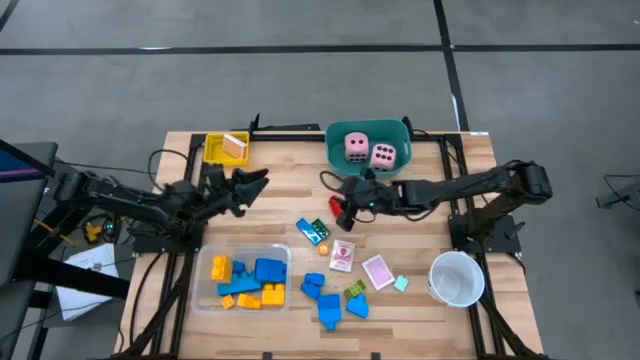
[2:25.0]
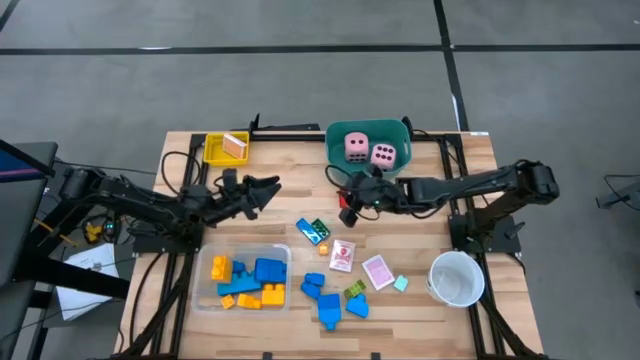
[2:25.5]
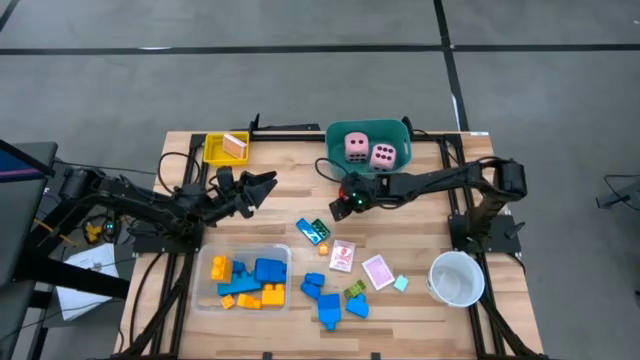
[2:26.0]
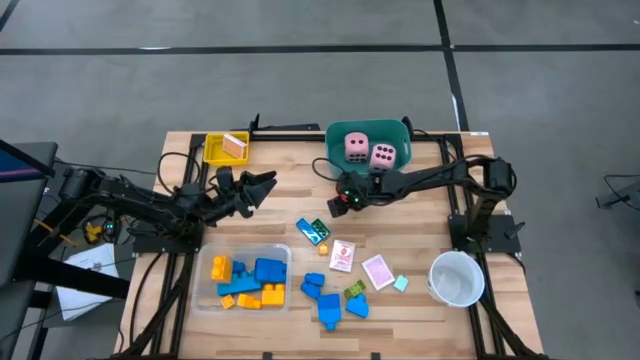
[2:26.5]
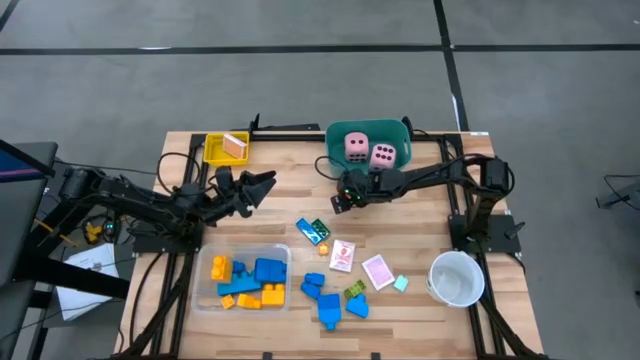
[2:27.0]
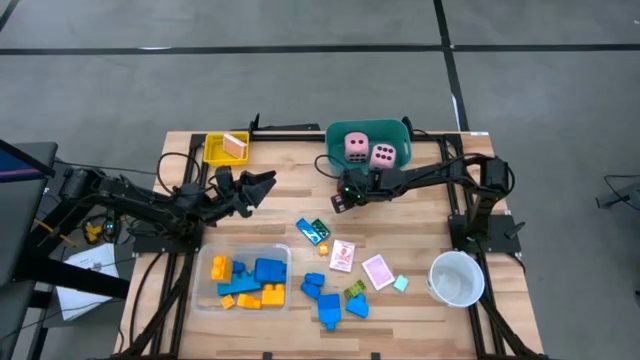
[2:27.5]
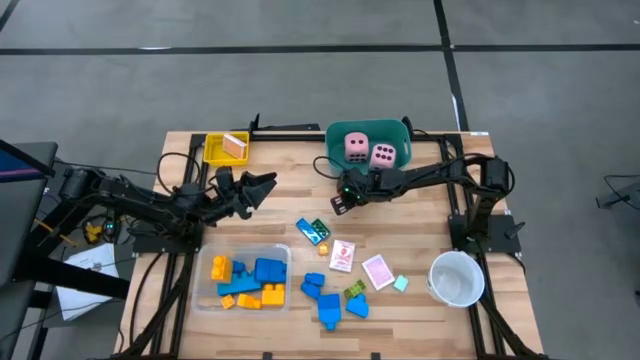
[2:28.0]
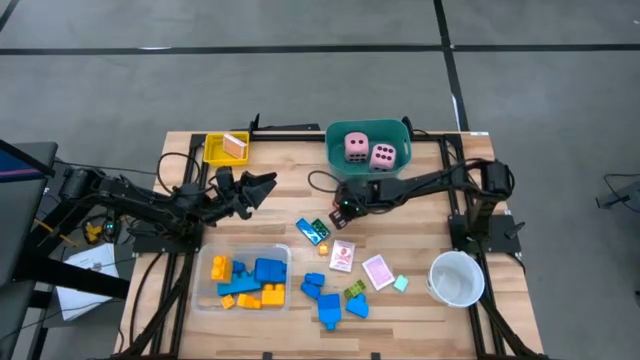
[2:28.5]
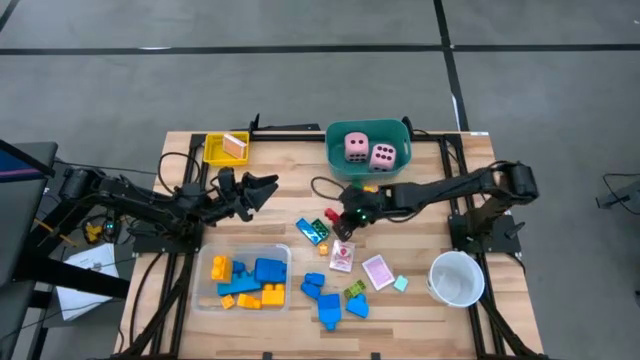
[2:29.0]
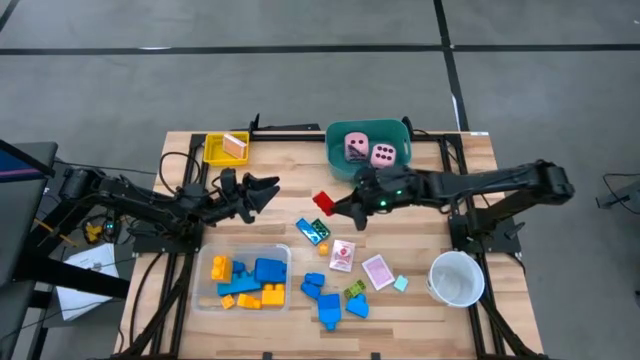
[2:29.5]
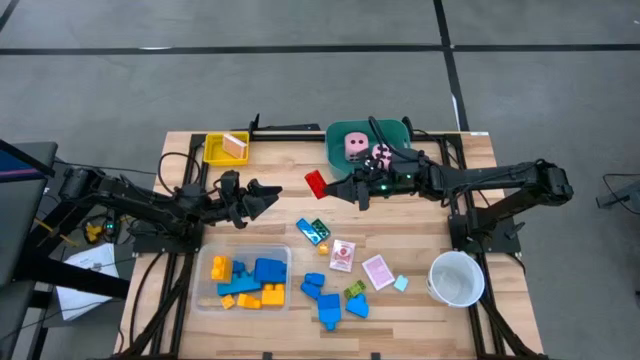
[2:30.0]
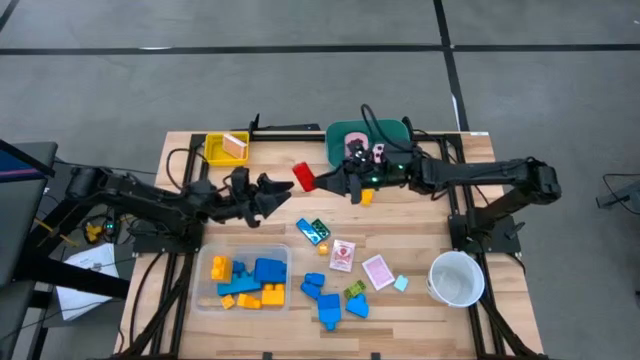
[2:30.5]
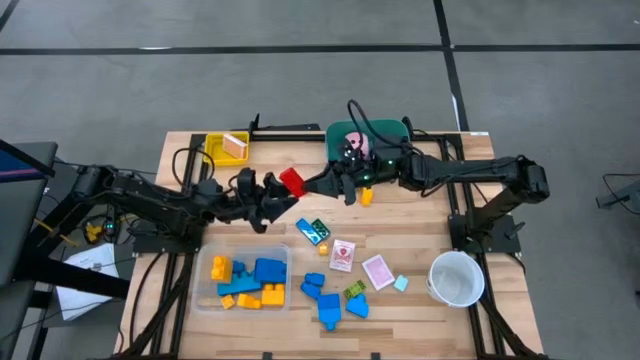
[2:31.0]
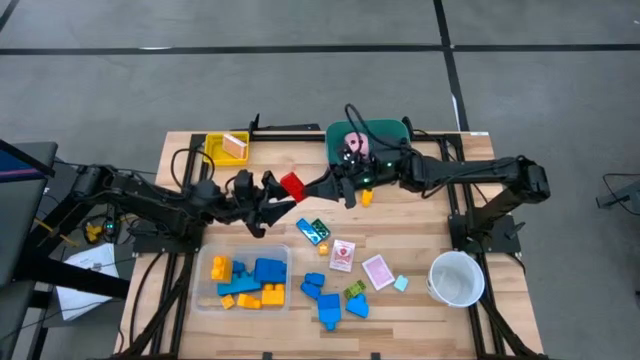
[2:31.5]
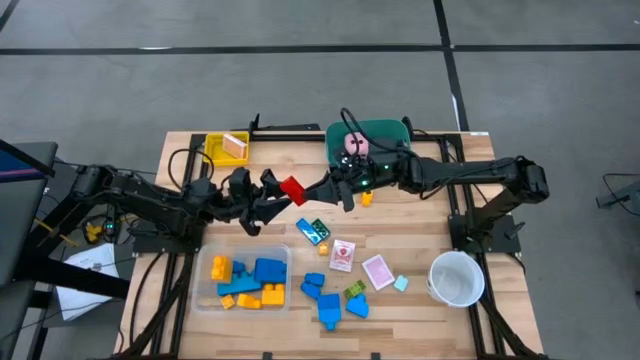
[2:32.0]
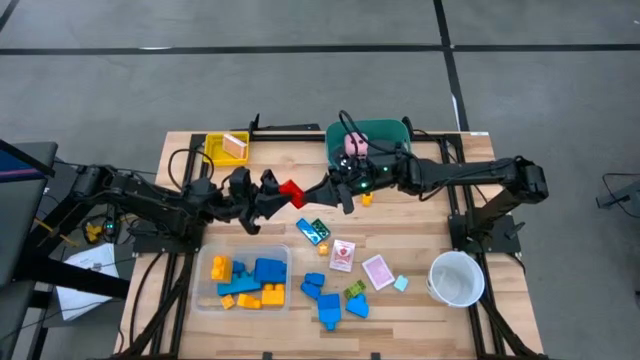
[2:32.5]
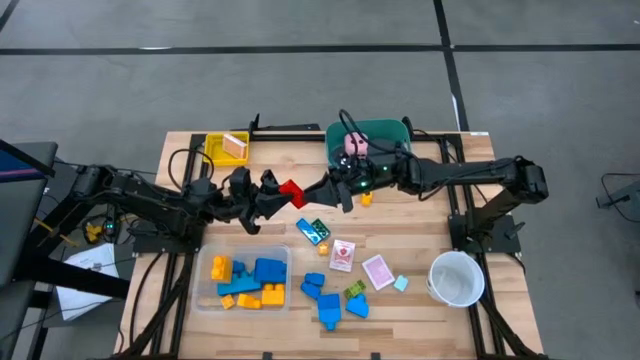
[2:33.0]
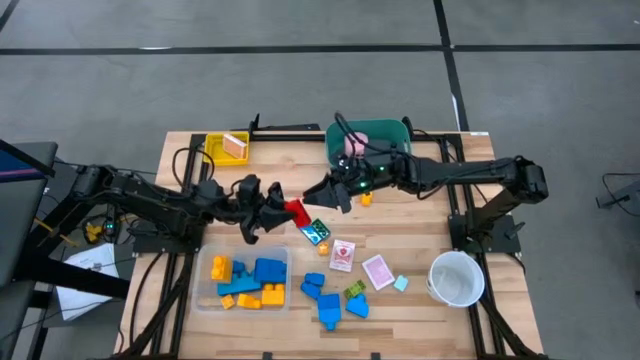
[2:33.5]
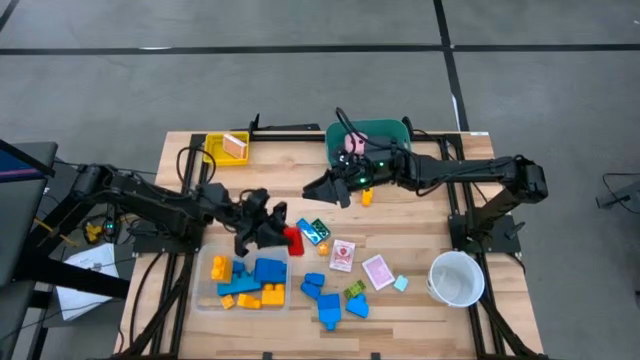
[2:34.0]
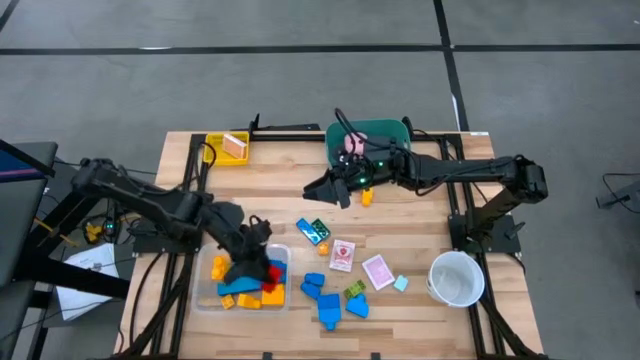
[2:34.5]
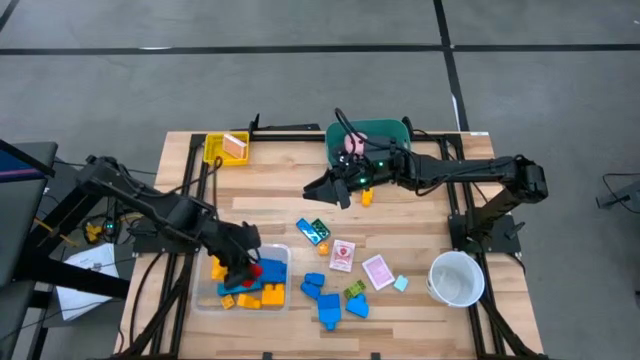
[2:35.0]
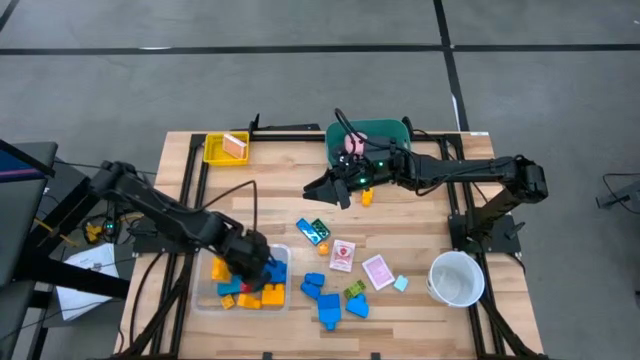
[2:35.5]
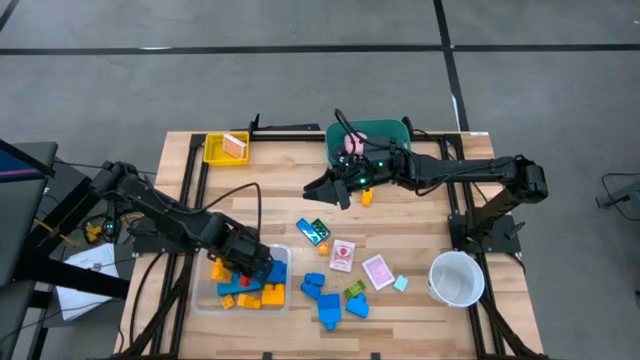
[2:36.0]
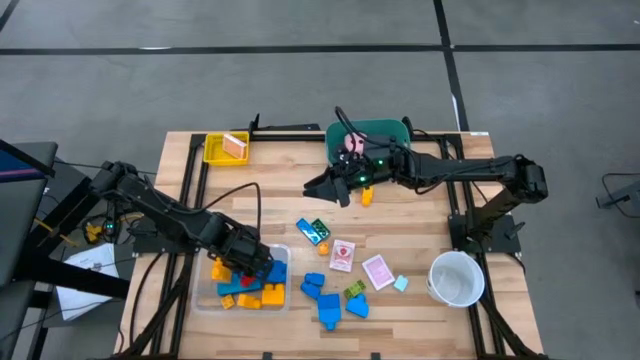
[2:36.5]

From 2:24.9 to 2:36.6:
Task: Pick & Place Toys
Put the red game piece into the transparent bin

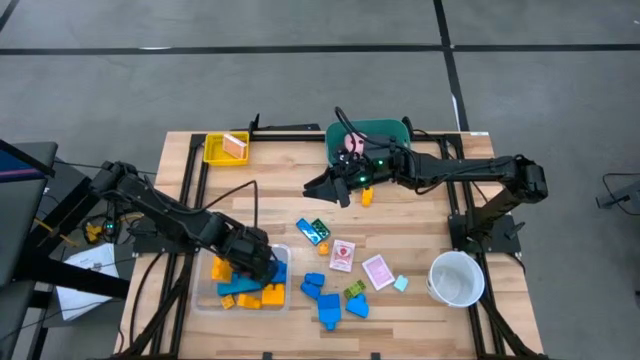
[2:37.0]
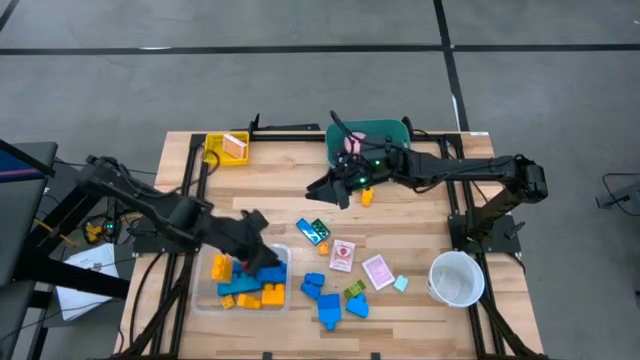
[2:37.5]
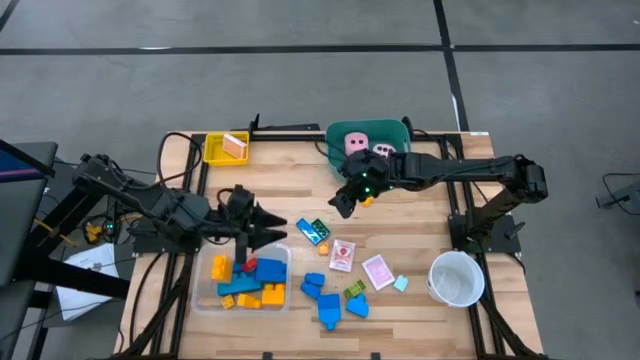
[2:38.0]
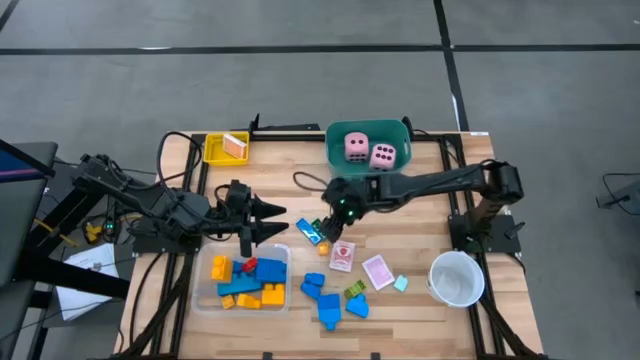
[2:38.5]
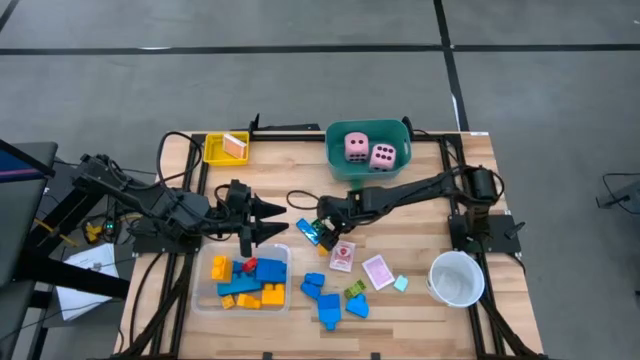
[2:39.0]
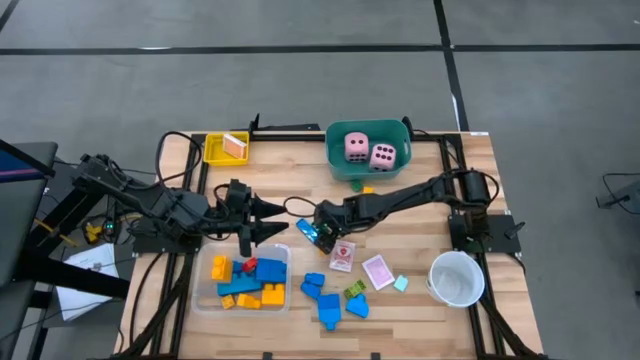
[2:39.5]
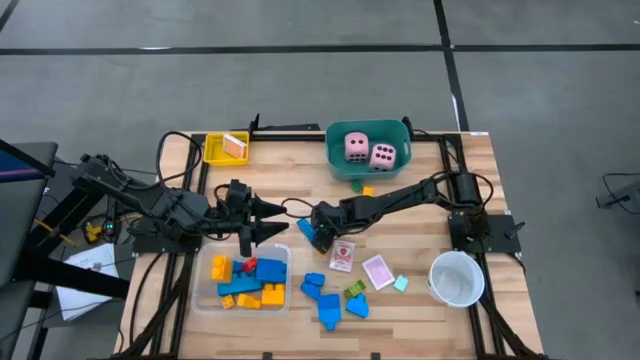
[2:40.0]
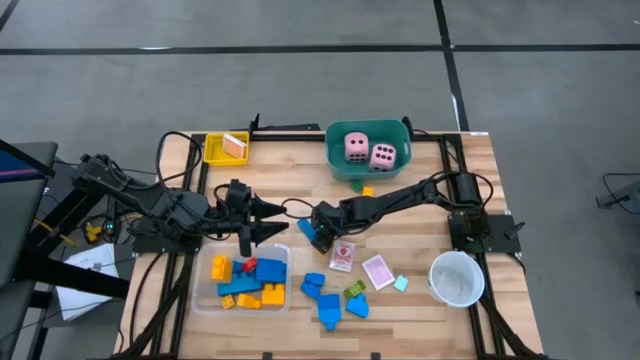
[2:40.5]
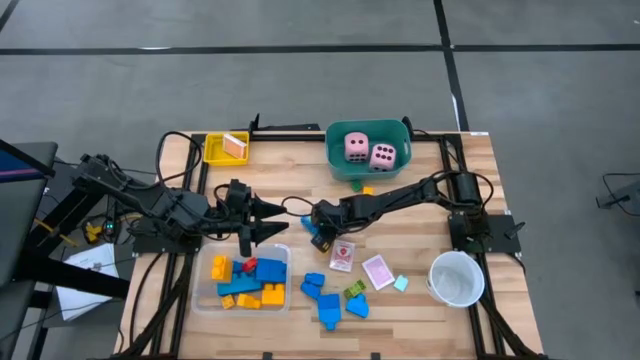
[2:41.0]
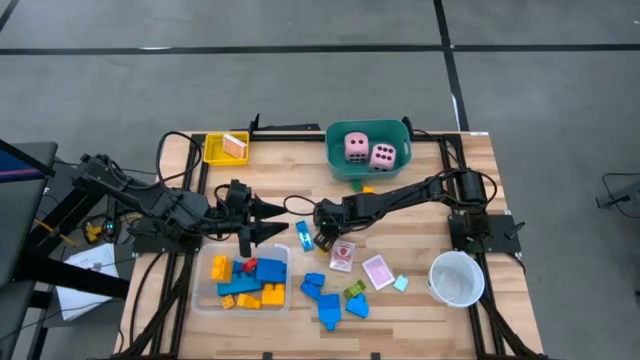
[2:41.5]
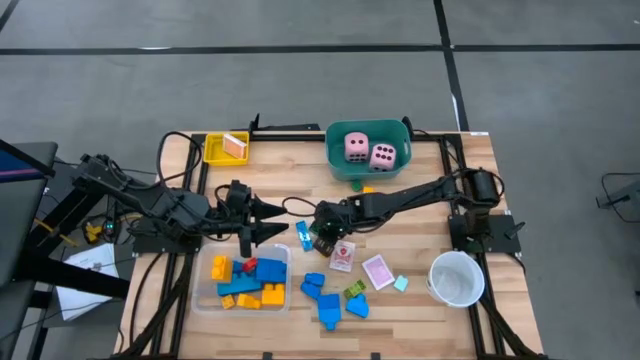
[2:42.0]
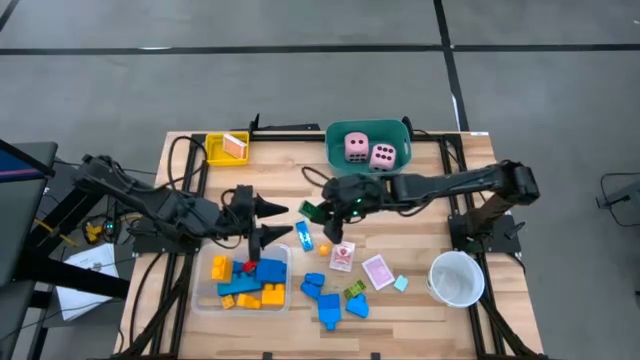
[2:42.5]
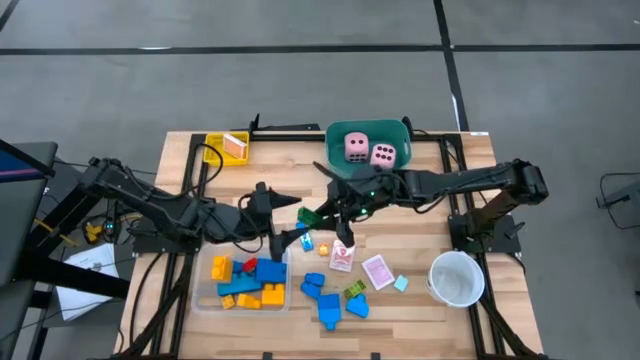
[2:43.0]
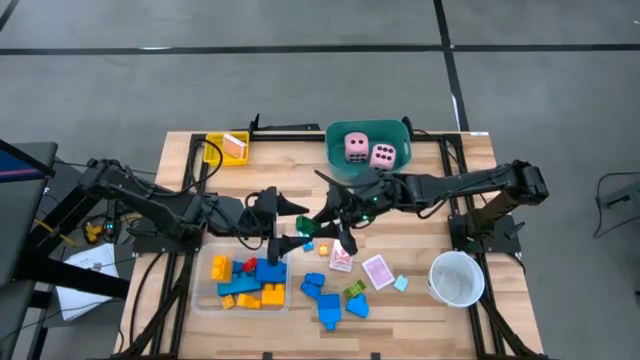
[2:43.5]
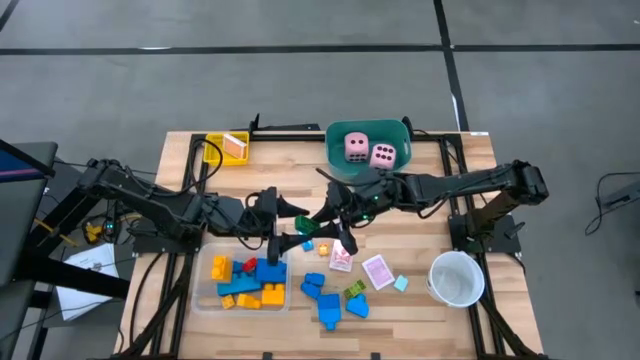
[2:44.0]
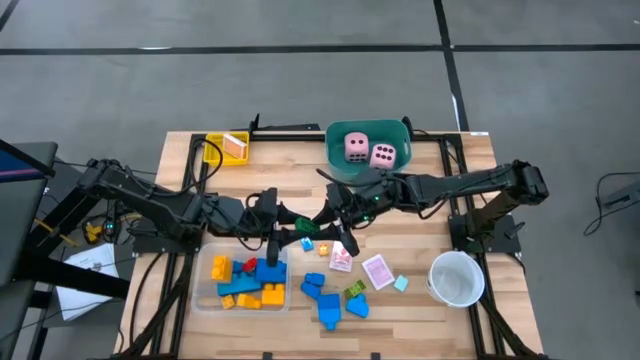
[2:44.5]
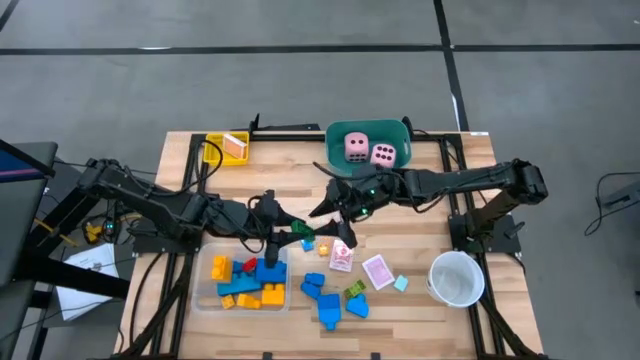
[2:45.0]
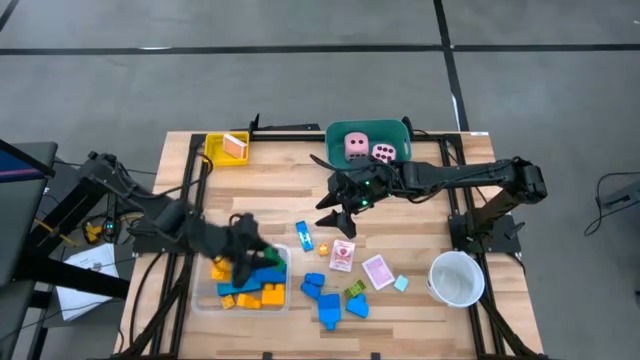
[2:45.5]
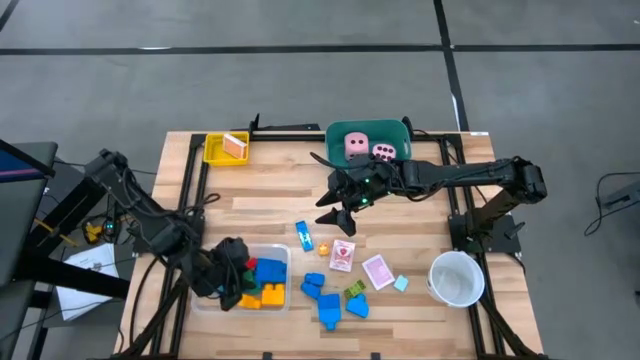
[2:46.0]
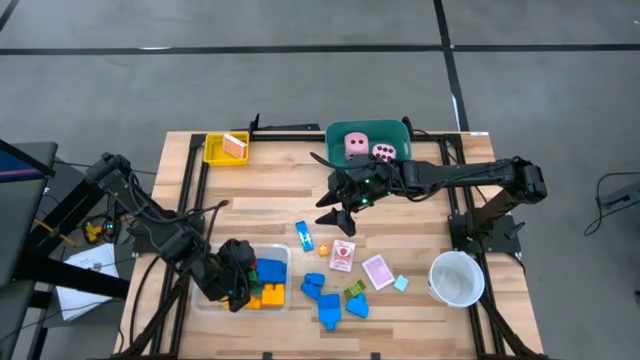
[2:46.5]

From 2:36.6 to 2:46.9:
Put the green game piece into the transparent bin

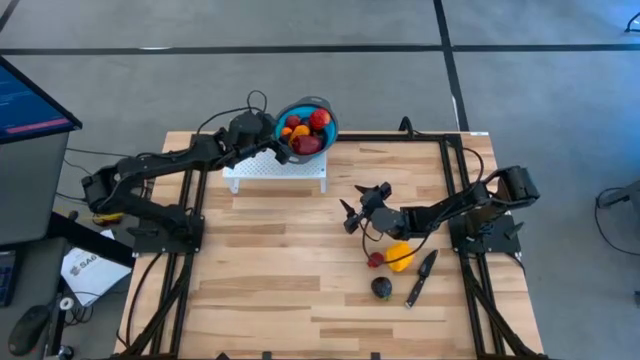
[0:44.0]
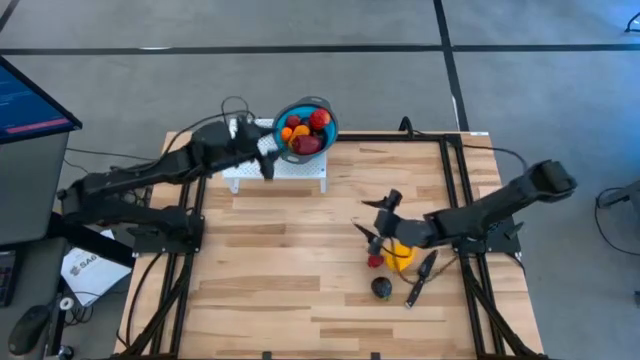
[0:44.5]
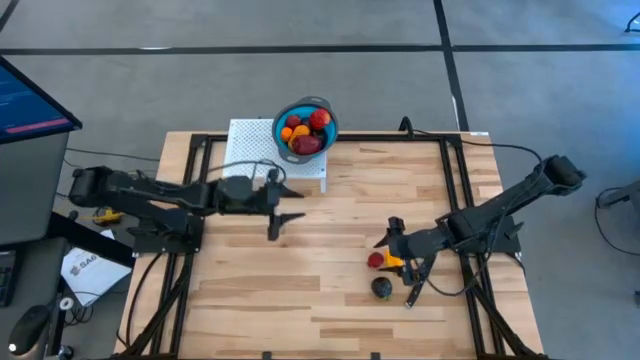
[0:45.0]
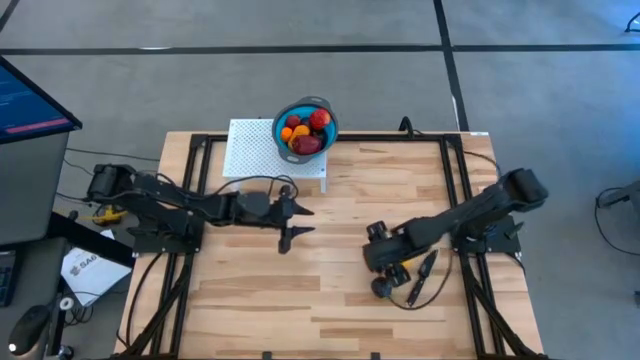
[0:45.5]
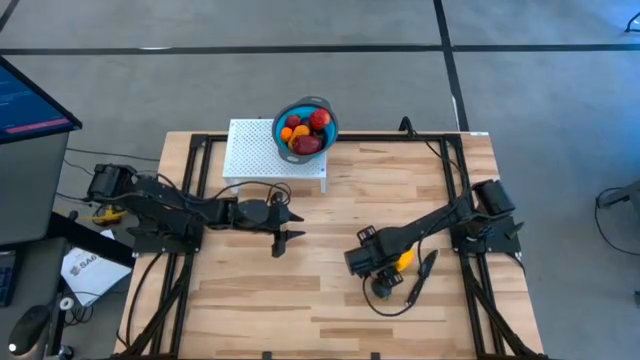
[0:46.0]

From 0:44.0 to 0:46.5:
Task: Pick & Place Fruit
Put the red pomegranate into the blue strainer bowl
